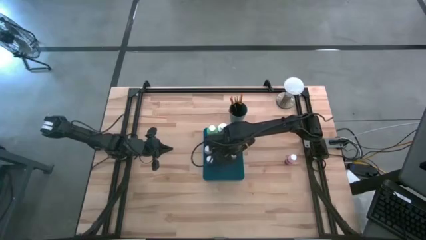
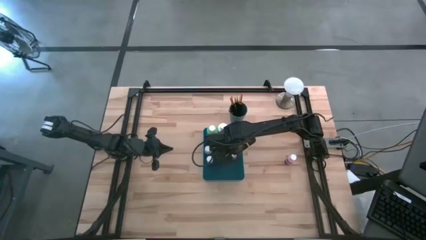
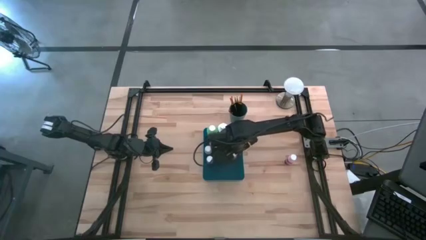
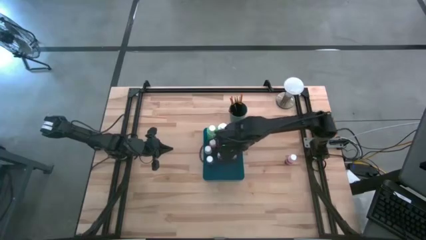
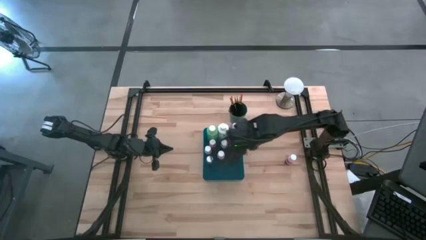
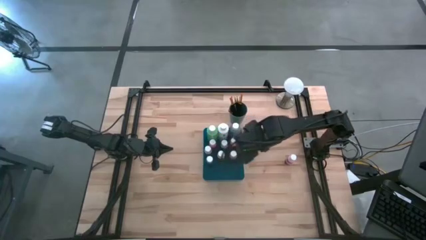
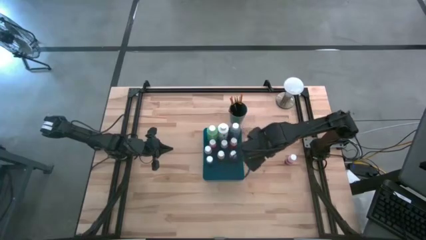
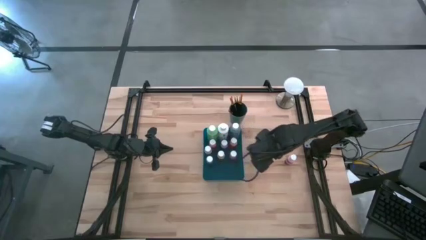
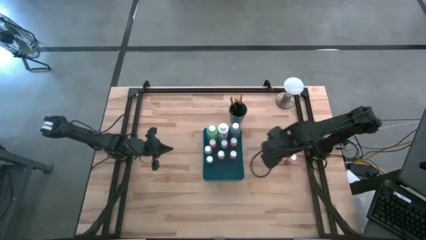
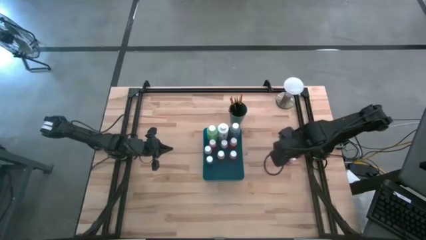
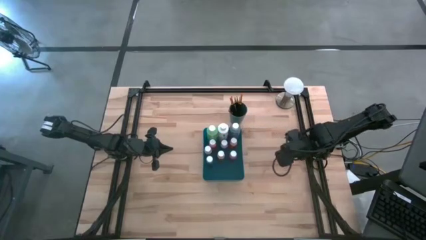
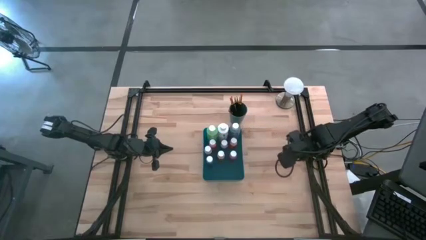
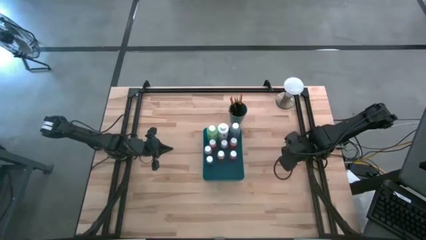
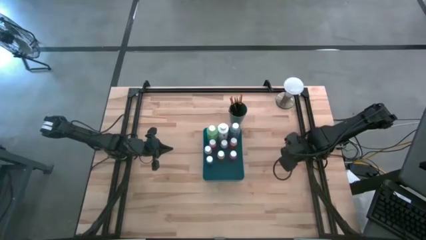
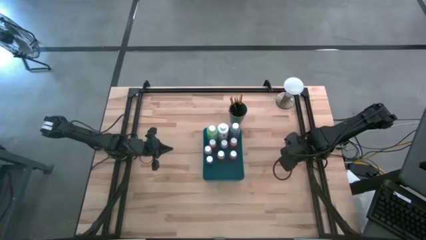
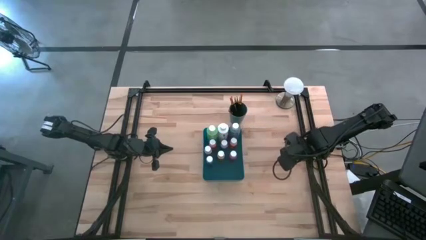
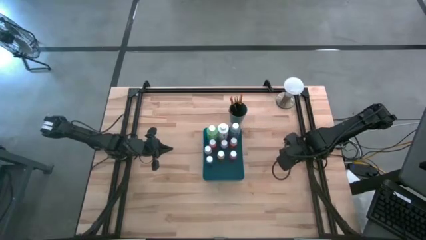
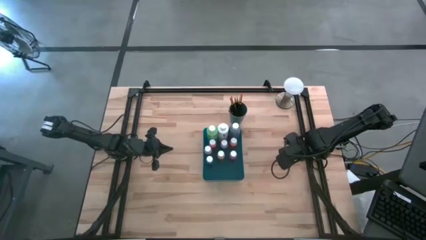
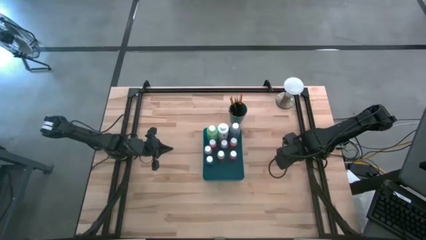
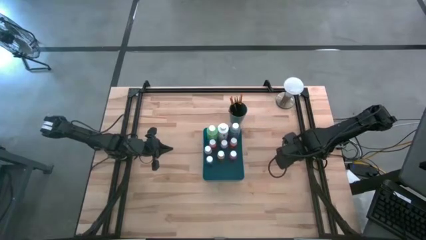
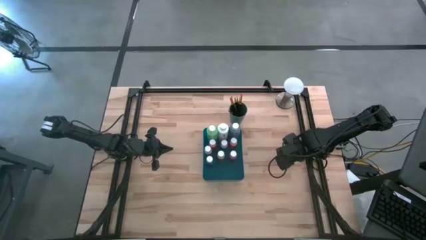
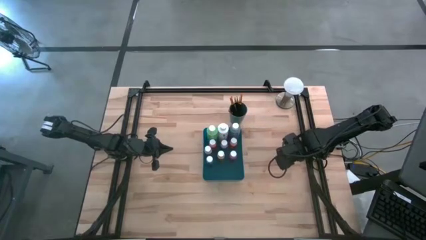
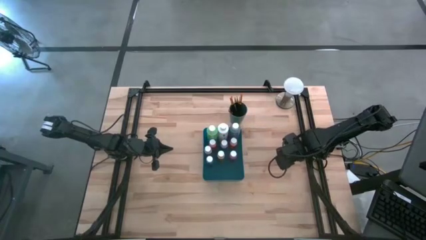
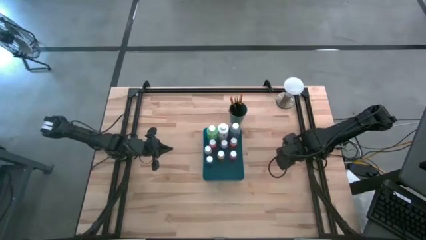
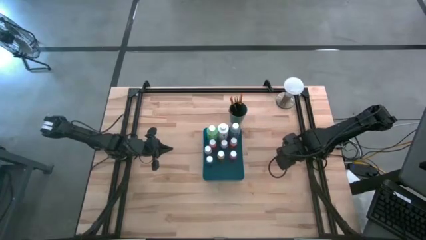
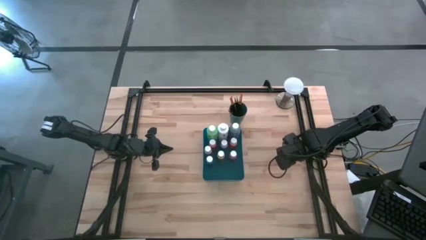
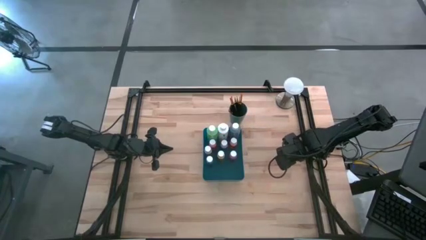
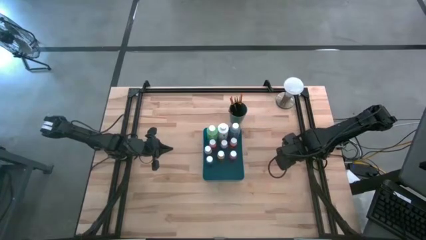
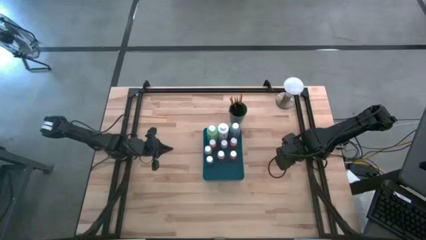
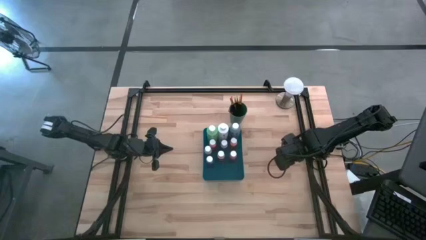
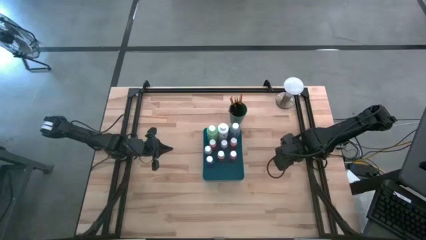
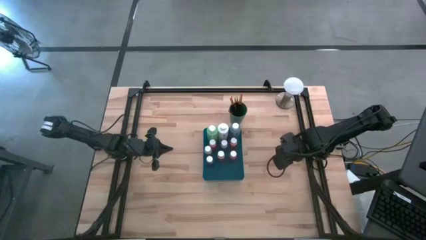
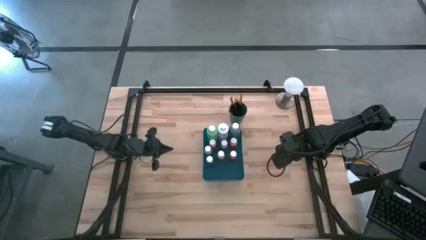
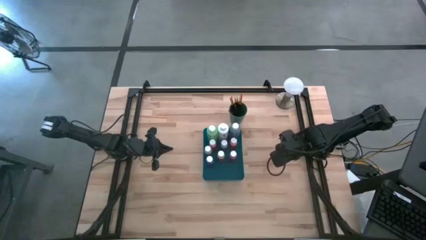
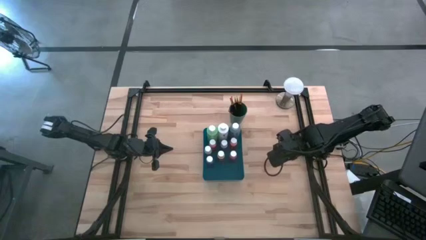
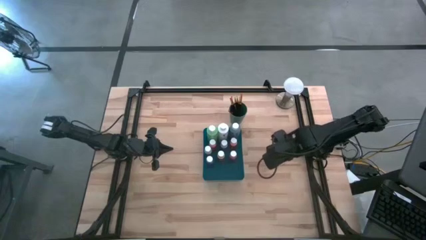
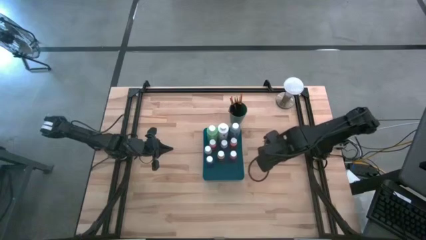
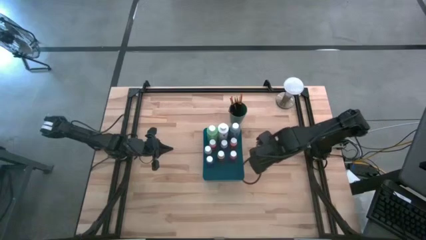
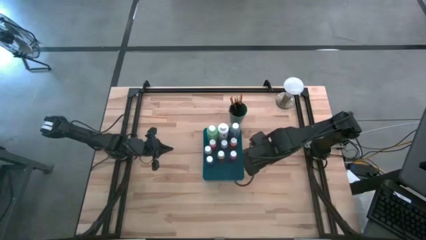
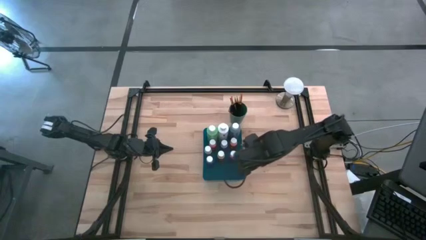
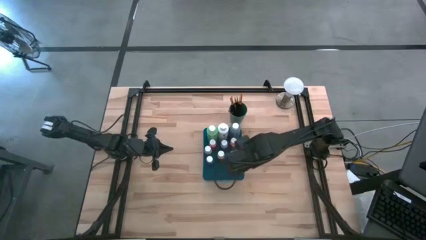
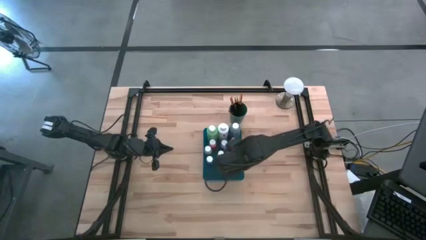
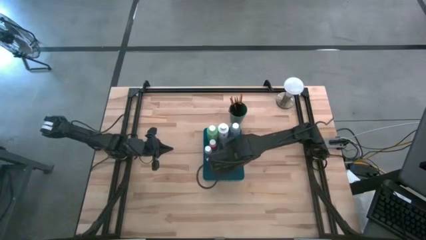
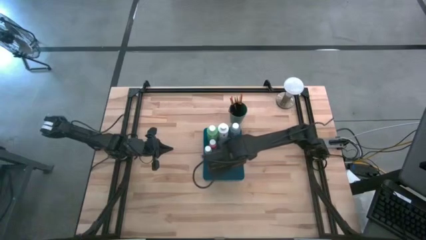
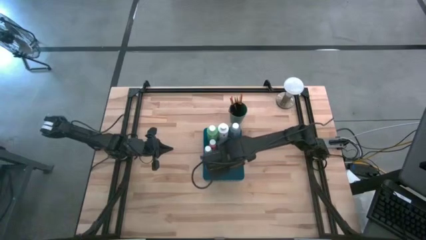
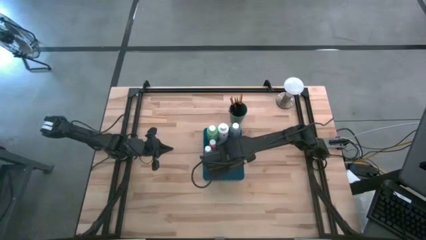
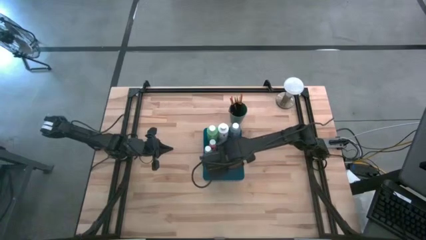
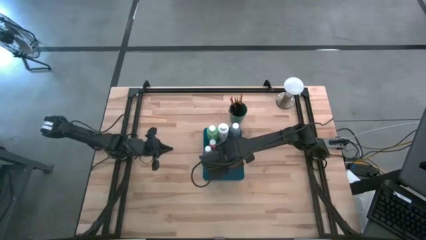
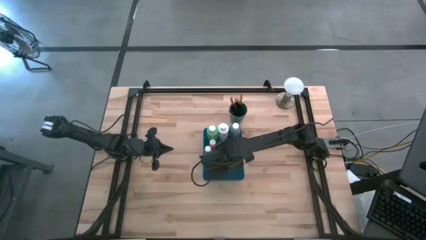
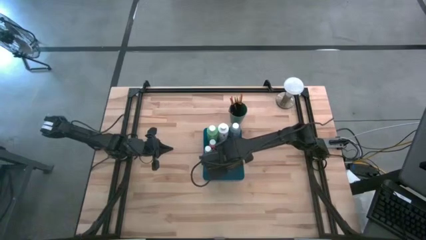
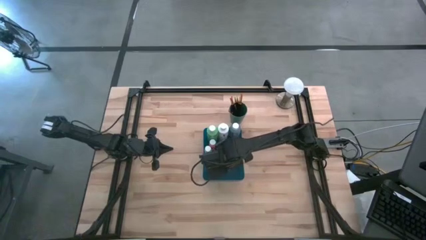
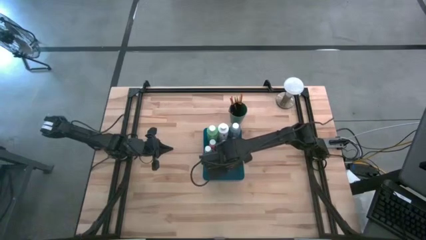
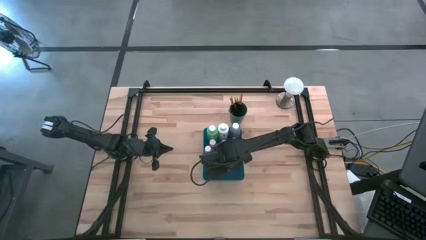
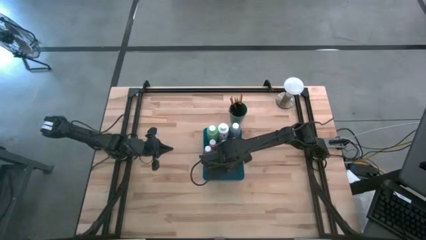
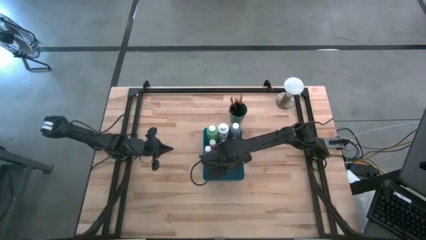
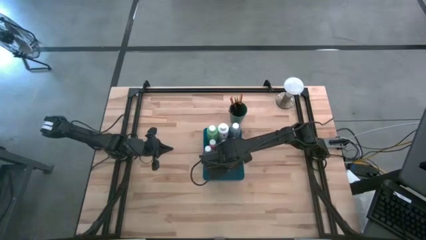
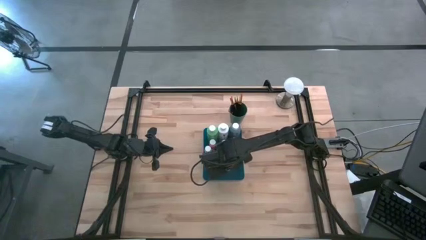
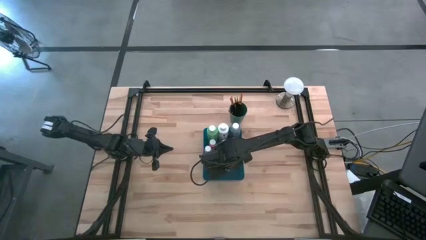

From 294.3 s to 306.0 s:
Task: Pick & Place Paint Supplies
Put the small light pink paint bottle into the blue bin

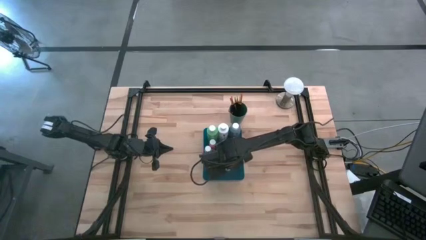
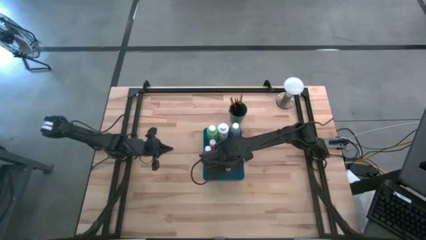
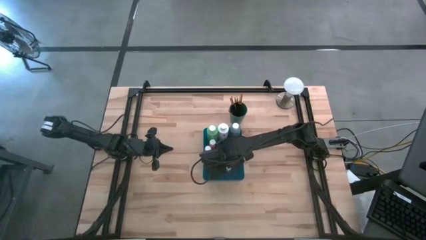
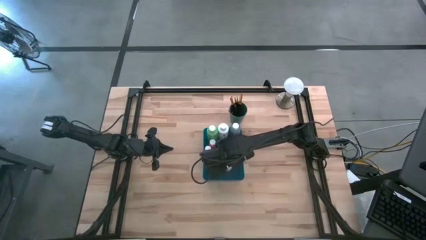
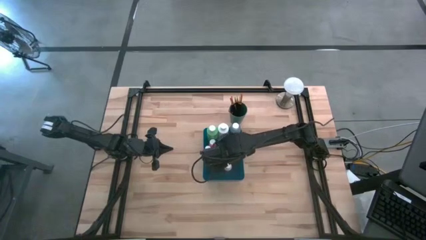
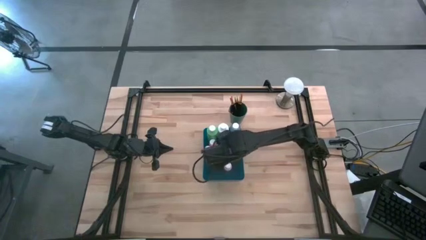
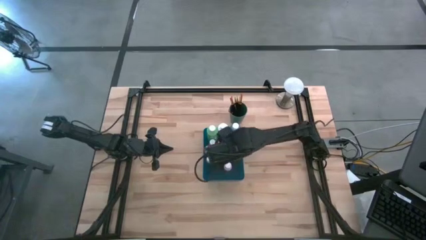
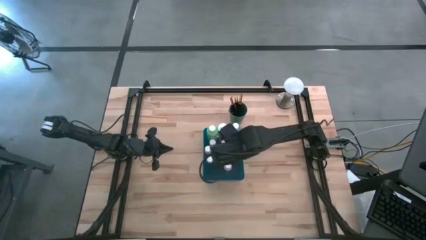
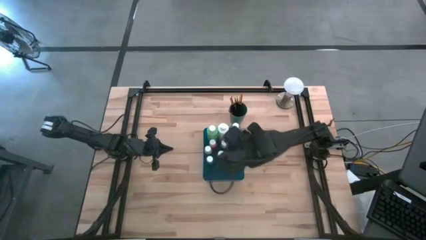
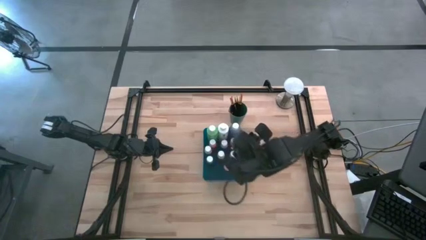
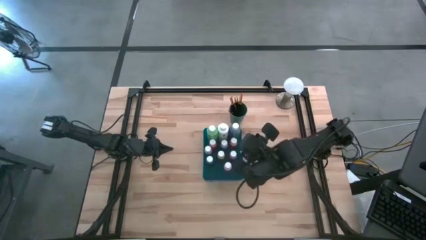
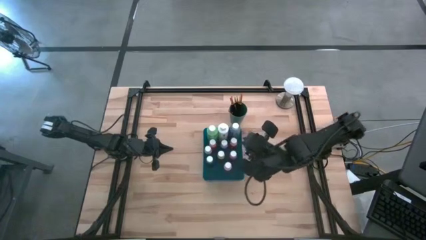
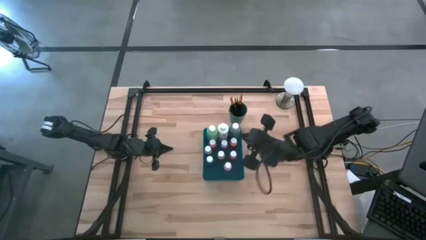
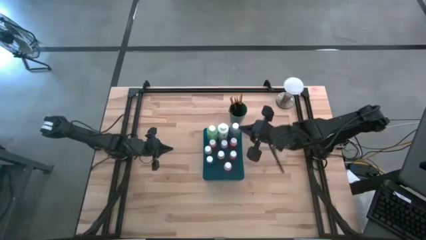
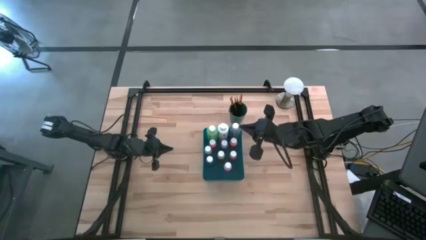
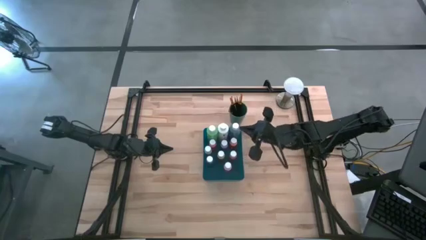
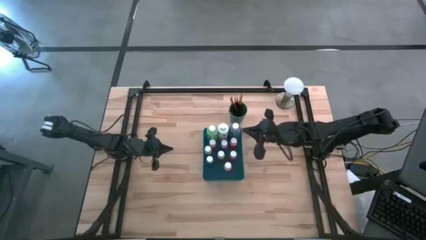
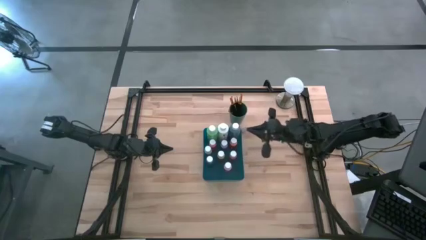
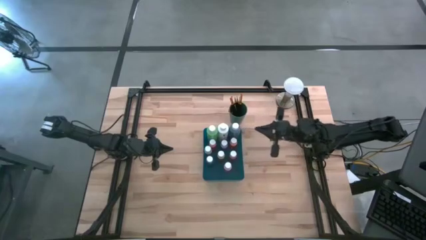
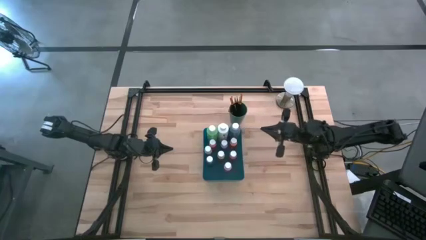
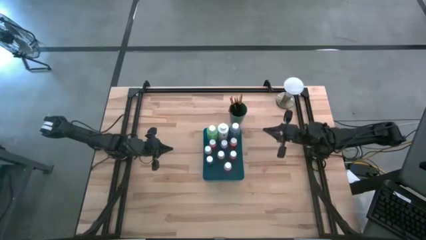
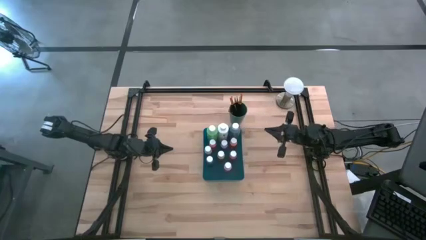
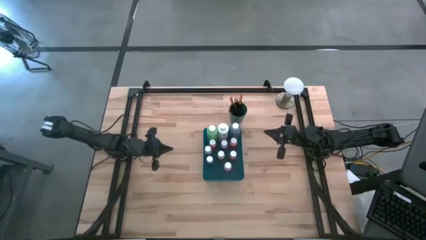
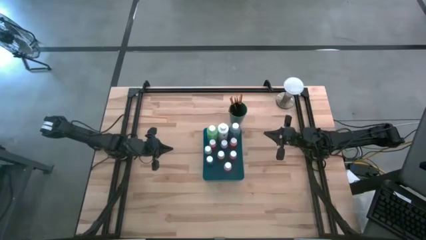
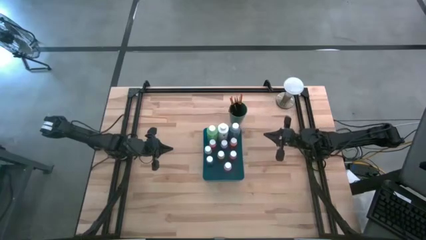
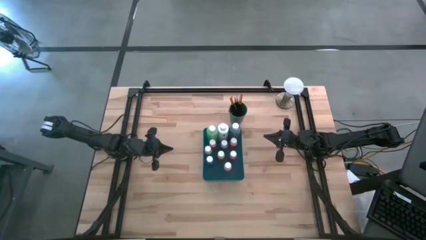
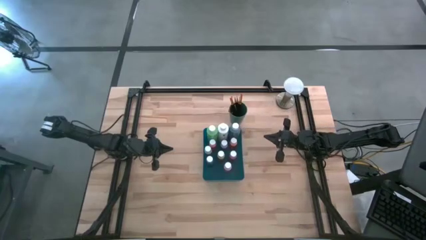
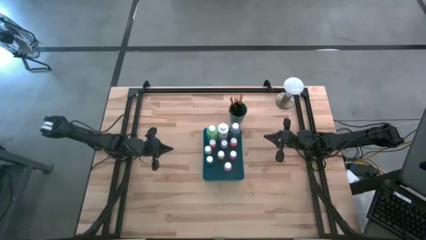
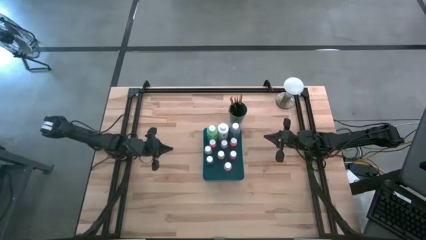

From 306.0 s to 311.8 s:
Return to Home Position
